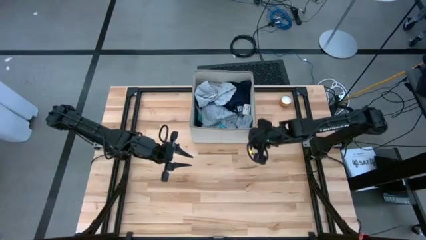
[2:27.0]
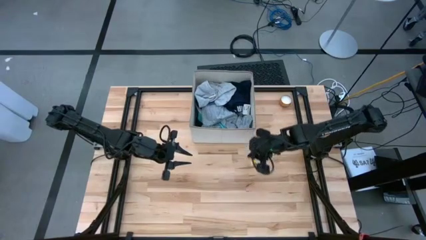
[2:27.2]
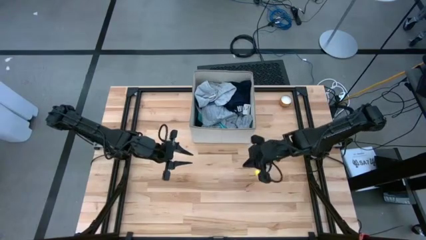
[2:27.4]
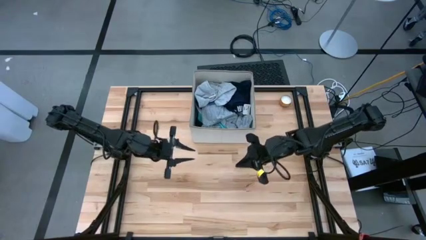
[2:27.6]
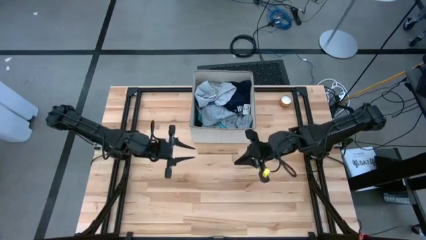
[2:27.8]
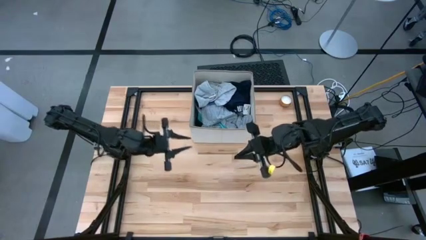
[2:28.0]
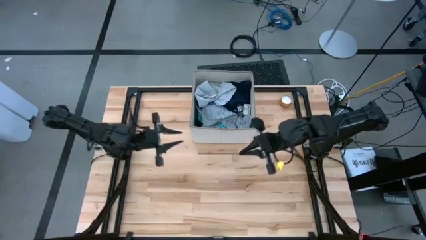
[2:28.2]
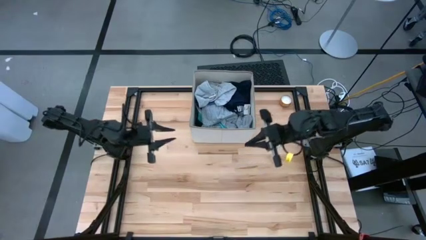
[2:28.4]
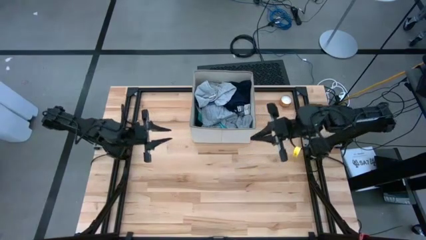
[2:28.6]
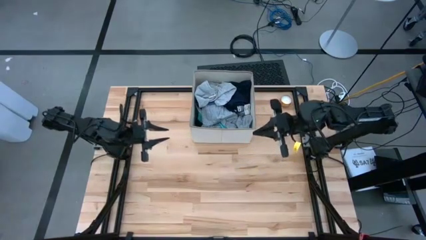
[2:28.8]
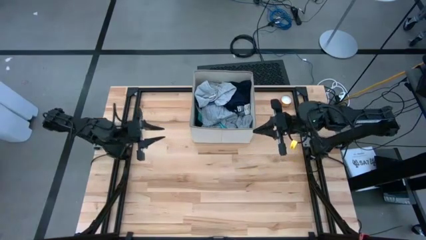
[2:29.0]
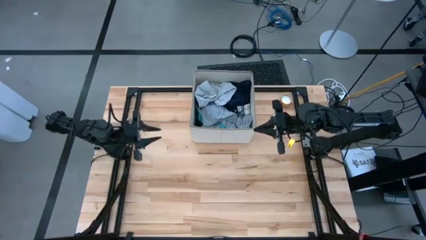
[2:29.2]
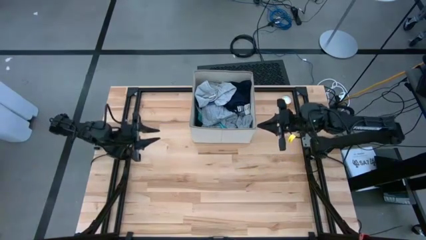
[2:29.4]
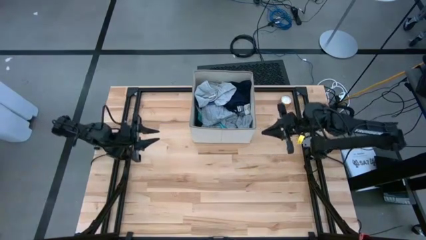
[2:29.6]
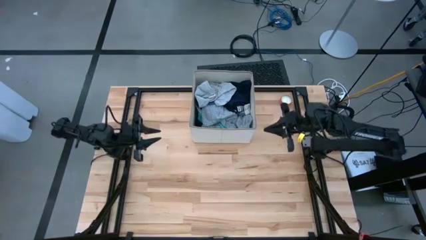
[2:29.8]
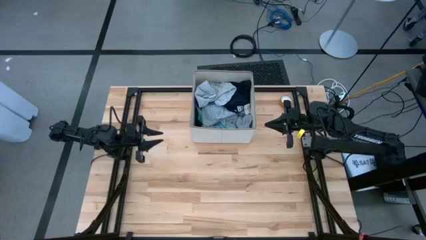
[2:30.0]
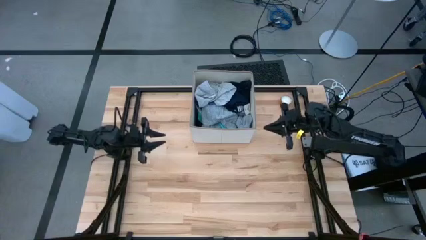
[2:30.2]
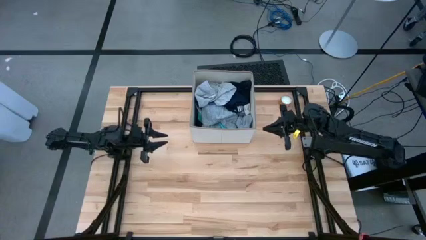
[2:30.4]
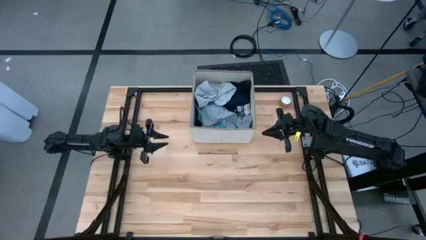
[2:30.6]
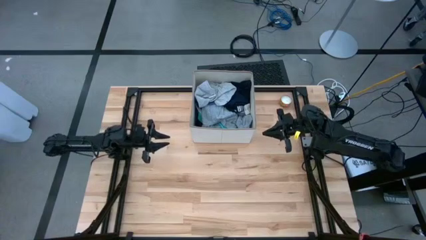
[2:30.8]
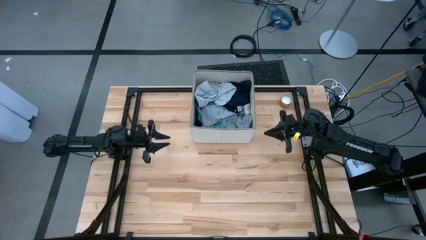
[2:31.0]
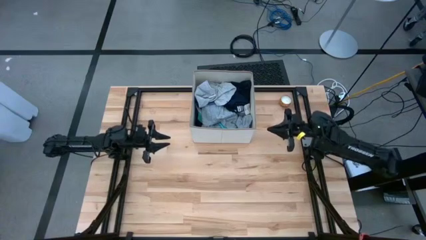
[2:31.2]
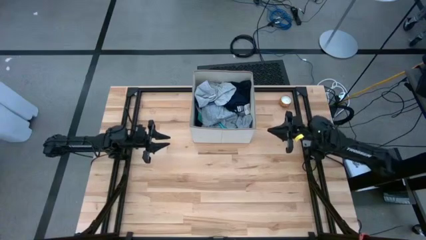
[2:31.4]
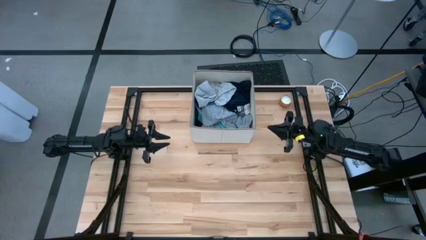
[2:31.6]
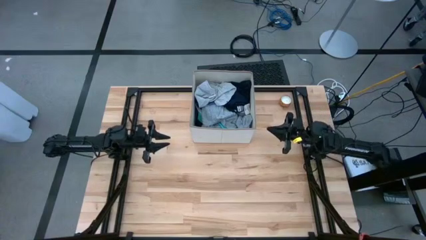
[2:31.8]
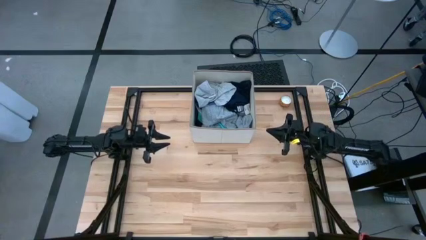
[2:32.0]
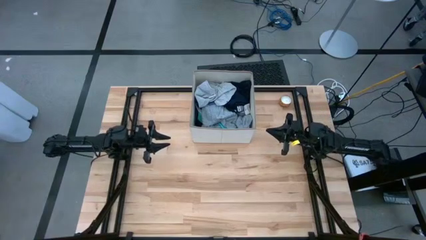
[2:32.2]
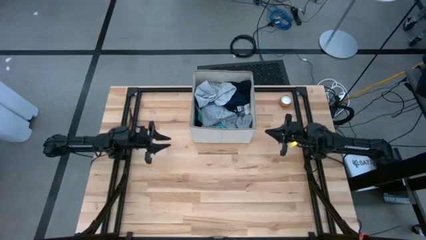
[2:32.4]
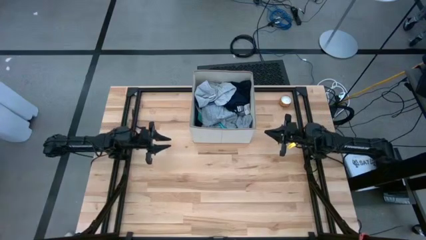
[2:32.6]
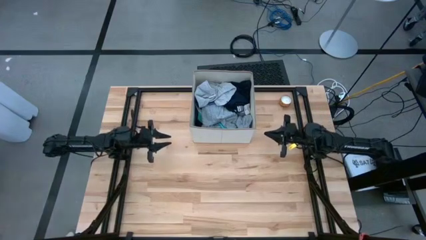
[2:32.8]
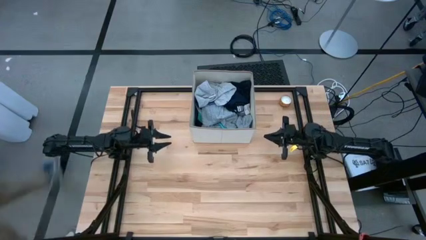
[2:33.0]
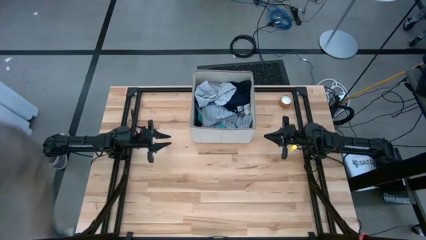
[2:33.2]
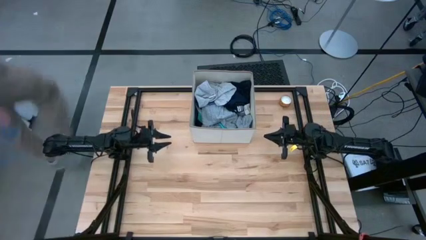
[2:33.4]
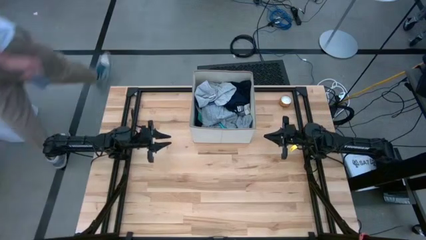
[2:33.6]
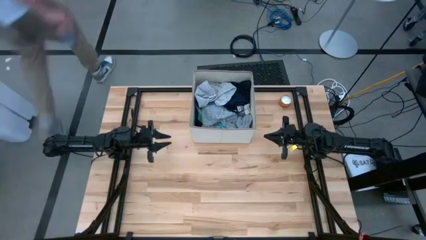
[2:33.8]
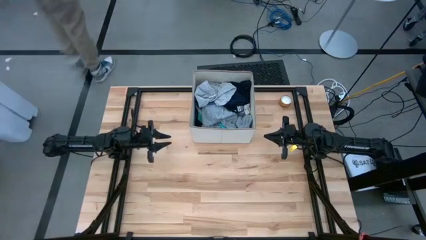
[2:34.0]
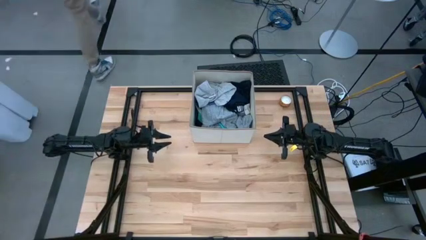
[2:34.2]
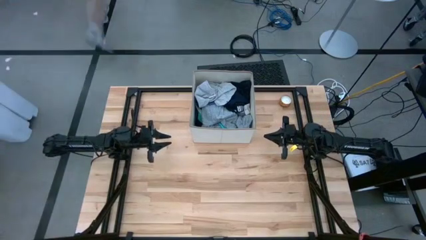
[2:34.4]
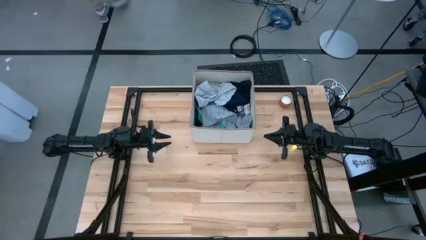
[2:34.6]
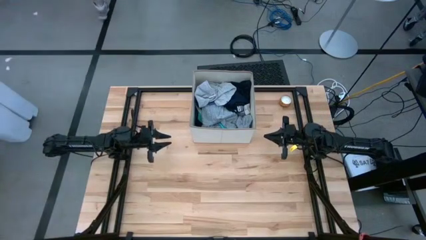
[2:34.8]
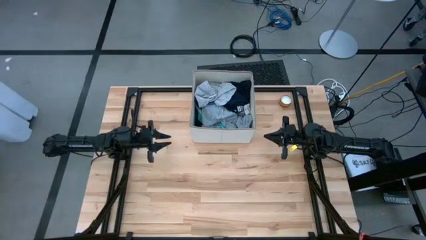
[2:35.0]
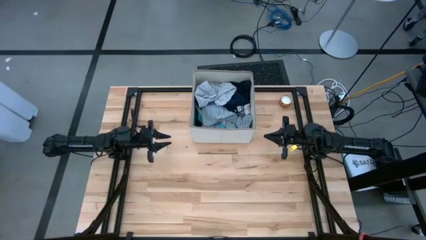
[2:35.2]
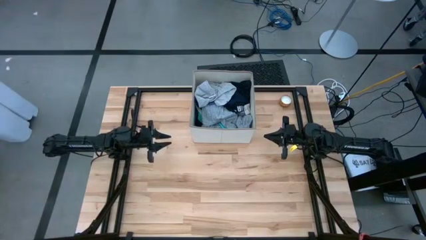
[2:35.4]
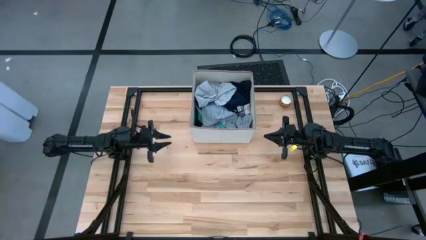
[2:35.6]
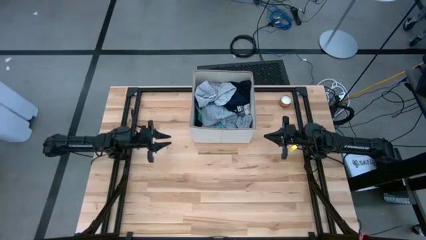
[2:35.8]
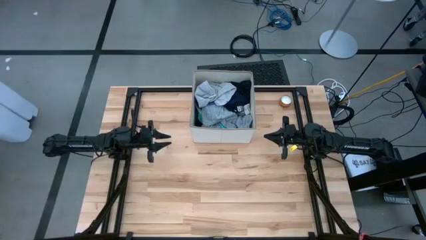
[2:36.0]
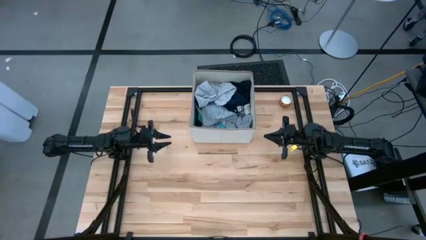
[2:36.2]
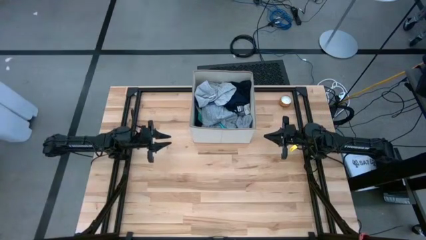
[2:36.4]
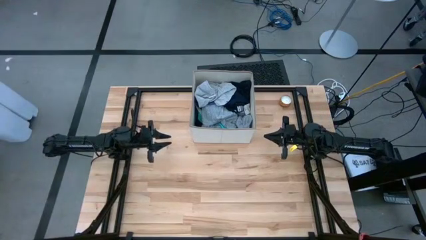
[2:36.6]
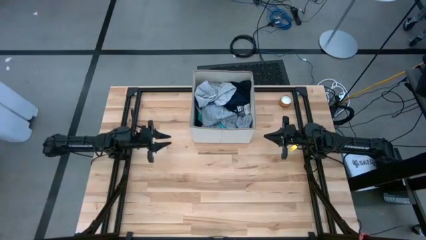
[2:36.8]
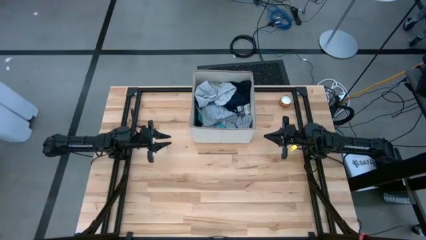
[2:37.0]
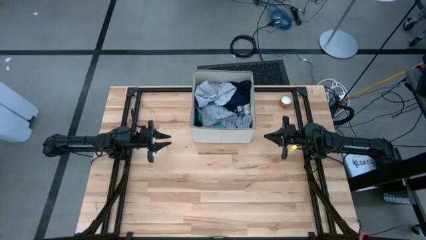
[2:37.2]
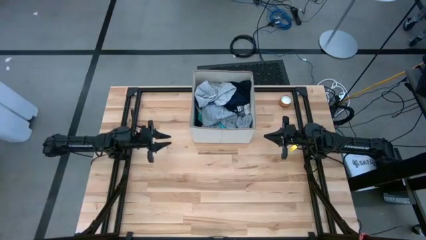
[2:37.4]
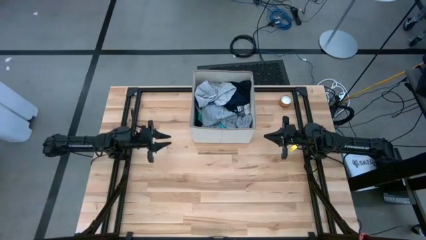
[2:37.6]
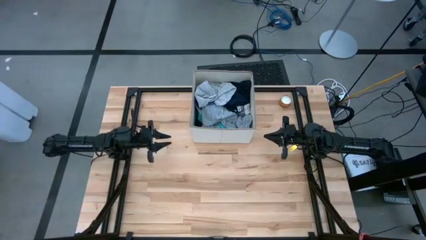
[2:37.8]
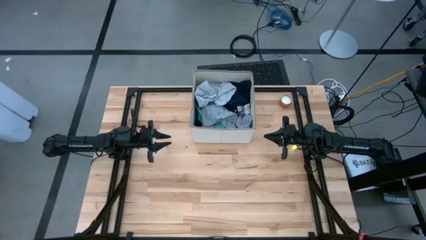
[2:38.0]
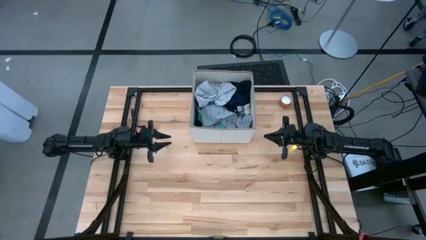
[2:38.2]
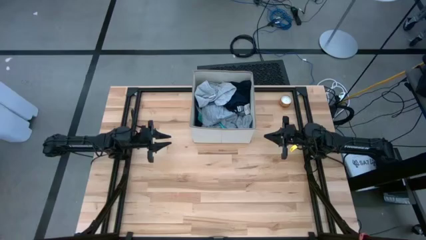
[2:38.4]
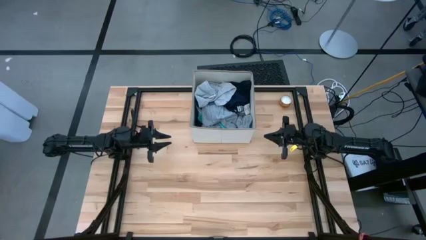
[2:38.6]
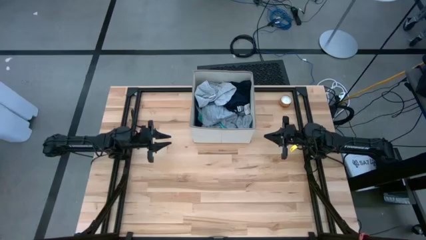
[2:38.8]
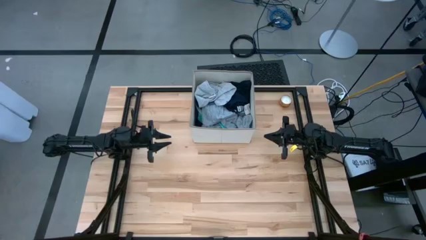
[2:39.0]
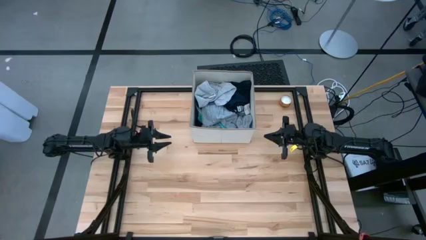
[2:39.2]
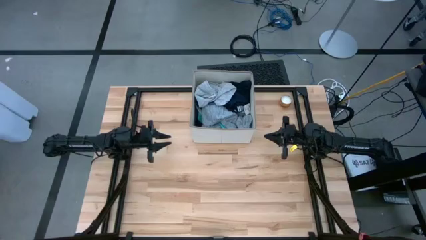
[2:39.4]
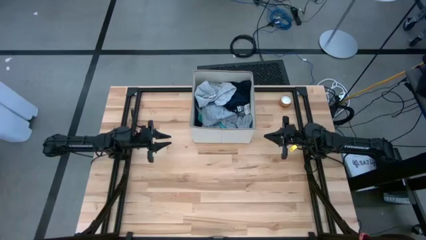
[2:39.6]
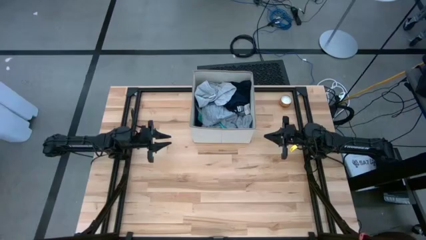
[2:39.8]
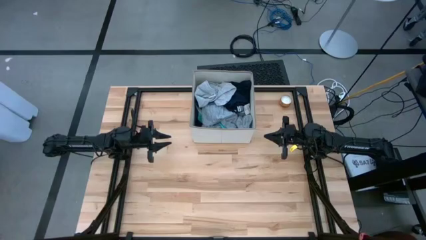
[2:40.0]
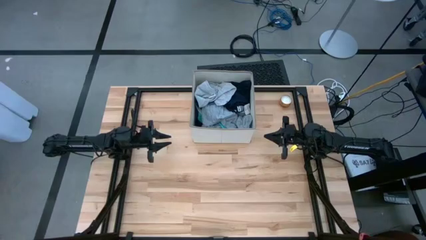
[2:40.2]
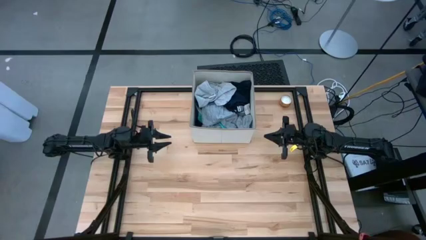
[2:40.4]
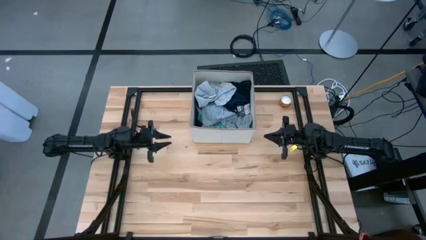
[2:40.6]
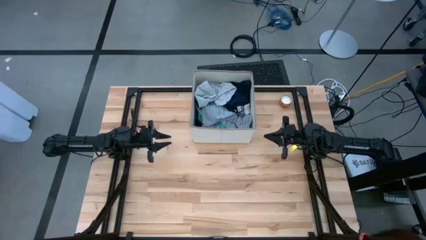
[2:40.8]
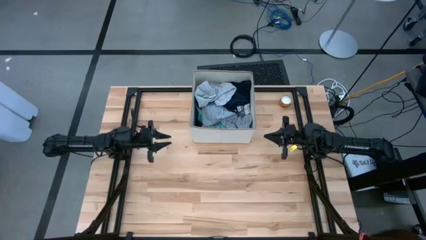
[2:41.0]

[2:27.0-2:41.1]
Task: Sort clothes
Return to Home Position

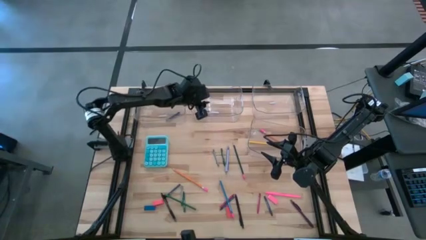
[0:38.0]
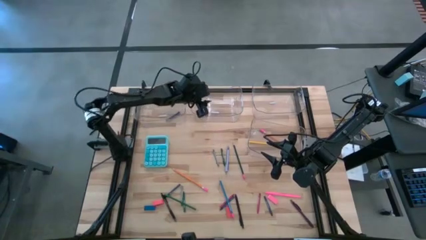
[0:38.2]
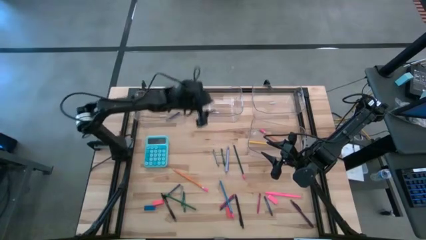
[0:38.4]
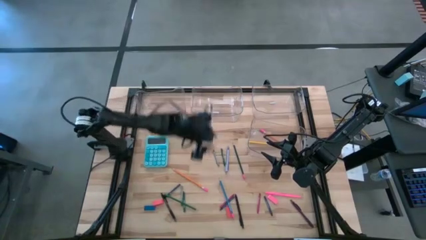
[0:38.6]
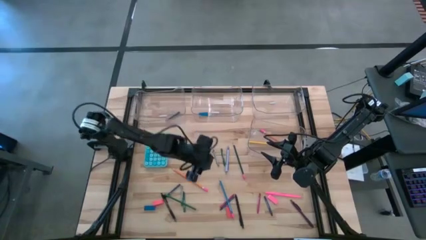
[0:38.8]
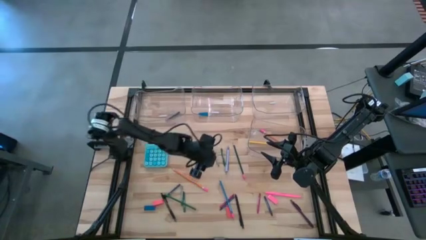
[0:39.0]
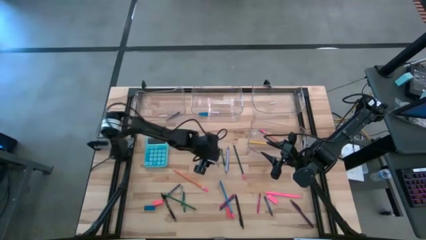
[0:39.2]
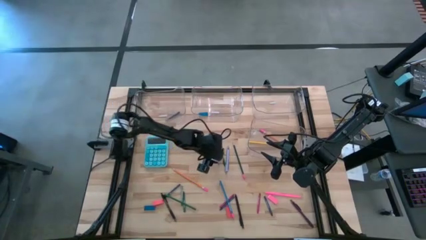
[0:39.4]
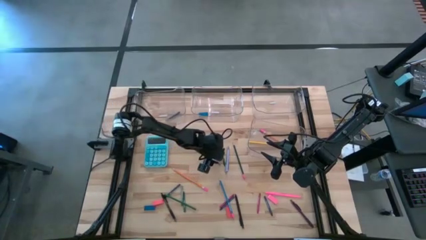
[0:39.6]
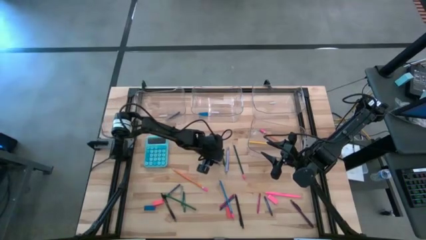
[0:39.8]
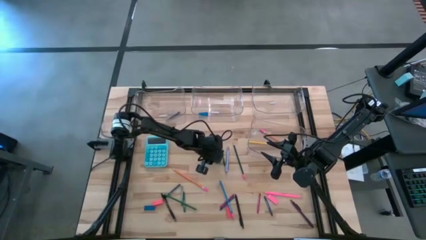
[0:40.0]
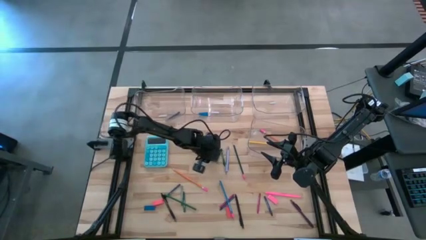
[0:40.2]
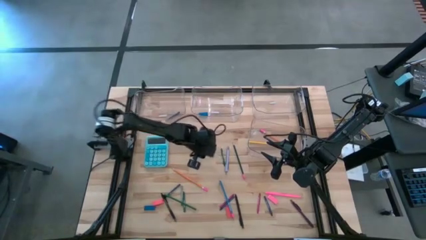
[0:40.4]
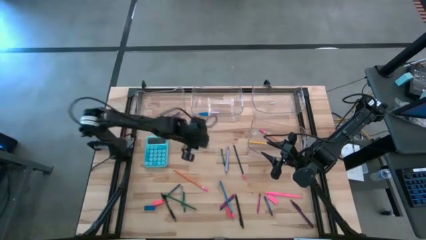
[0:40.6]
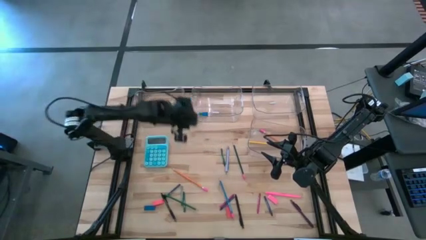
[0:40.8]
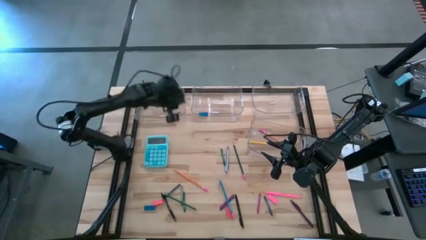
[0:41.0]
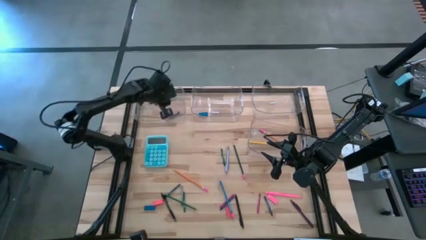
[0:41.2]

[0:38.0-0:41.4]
Task: Sort crayons/erasers/pens/pencils in bins
Put the top gray crayon into the top left transparent bin
